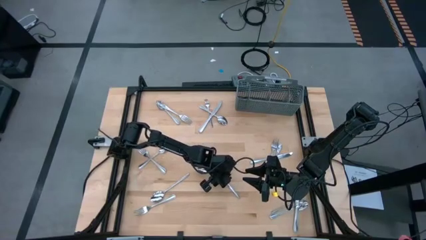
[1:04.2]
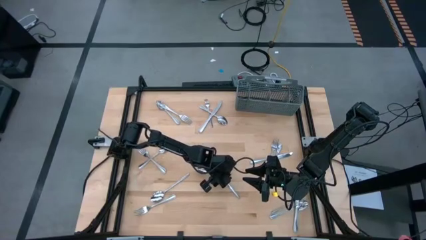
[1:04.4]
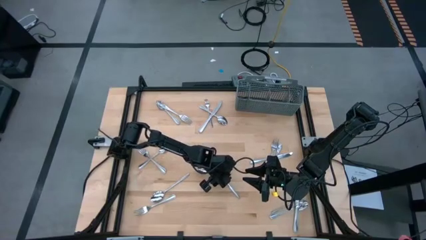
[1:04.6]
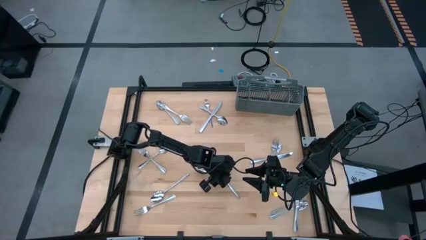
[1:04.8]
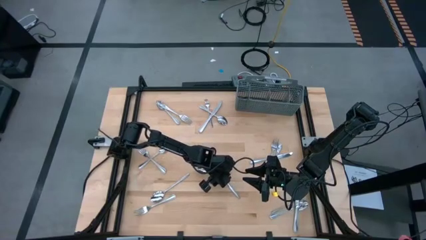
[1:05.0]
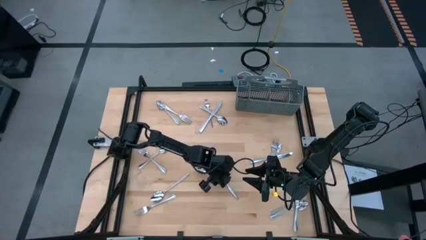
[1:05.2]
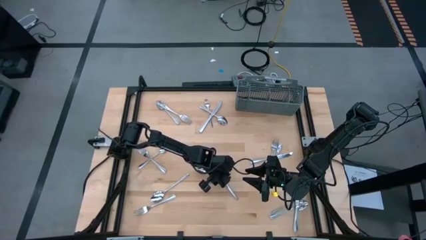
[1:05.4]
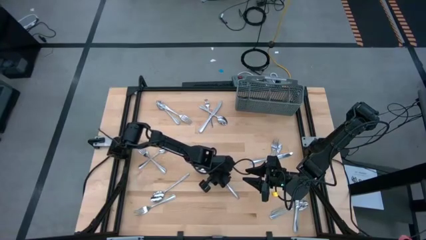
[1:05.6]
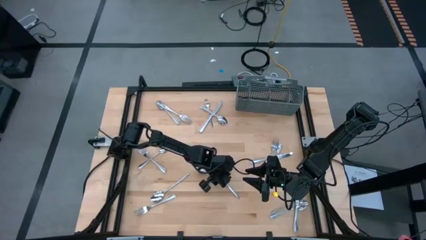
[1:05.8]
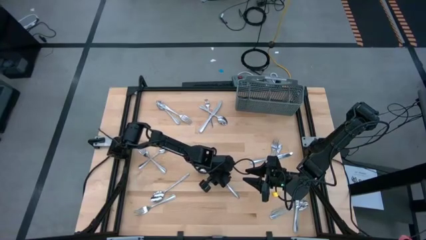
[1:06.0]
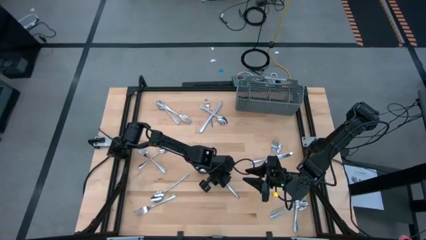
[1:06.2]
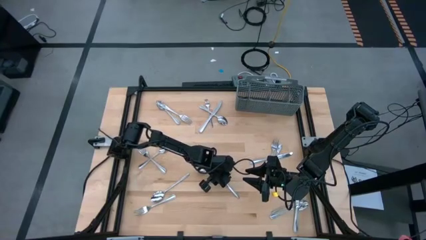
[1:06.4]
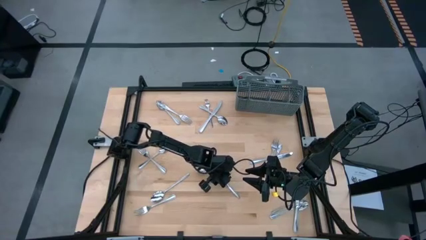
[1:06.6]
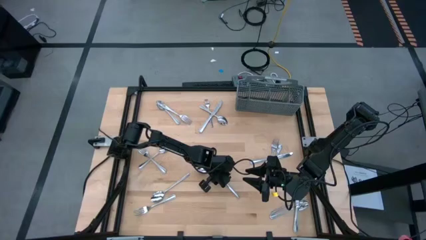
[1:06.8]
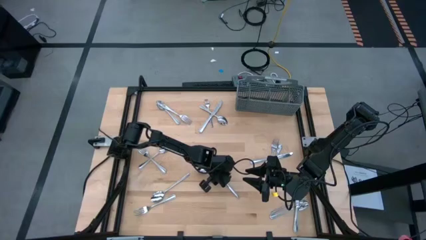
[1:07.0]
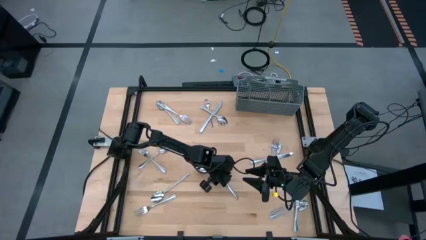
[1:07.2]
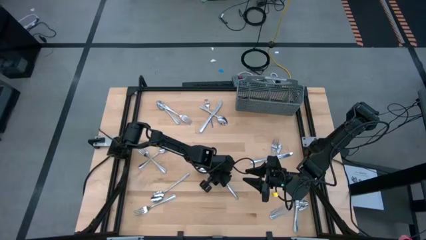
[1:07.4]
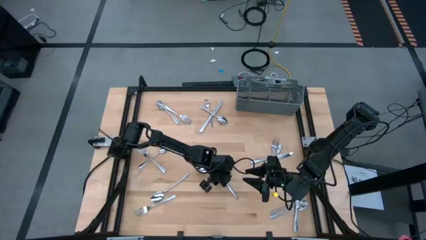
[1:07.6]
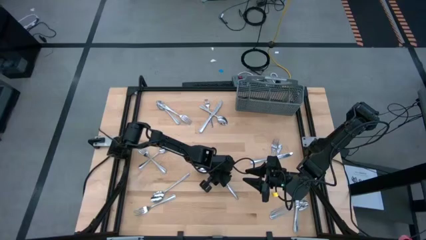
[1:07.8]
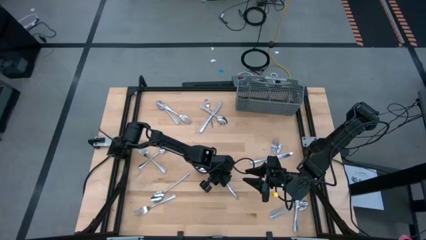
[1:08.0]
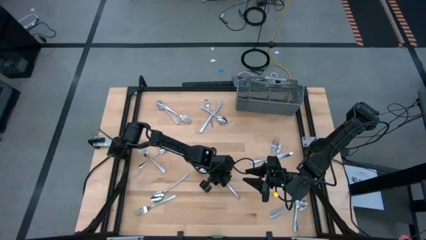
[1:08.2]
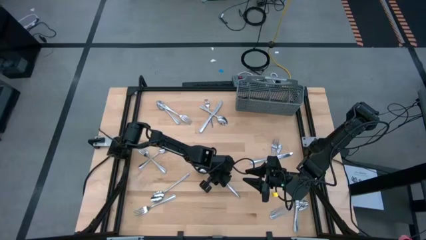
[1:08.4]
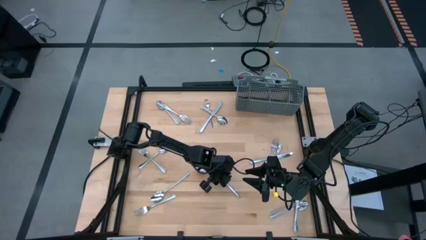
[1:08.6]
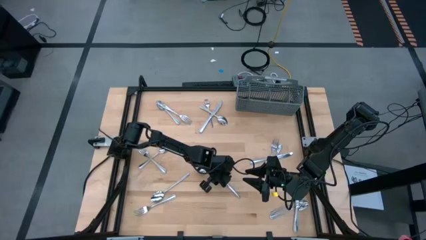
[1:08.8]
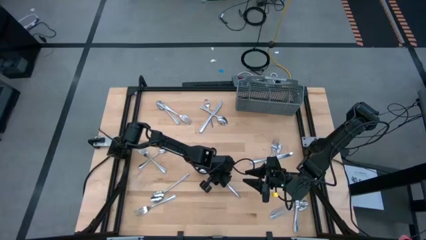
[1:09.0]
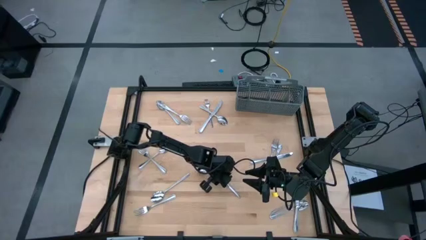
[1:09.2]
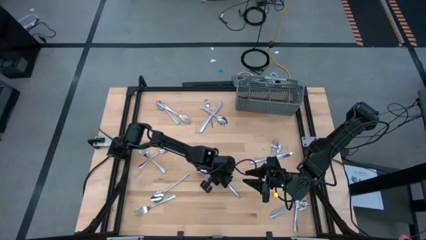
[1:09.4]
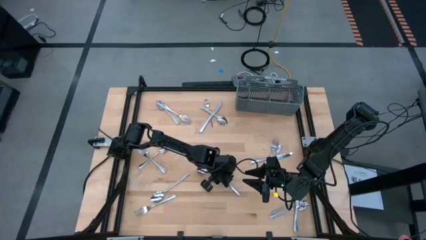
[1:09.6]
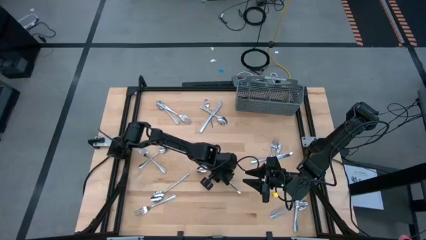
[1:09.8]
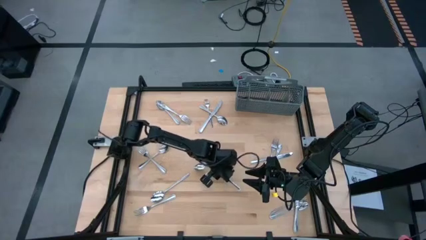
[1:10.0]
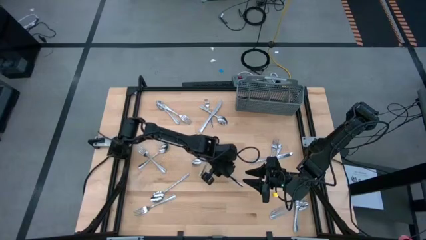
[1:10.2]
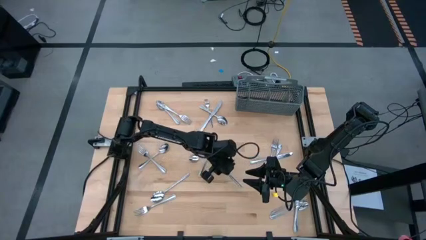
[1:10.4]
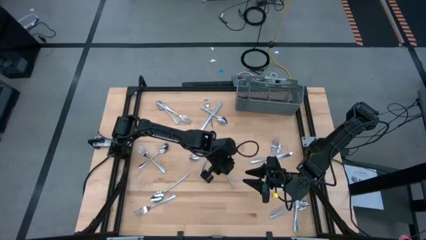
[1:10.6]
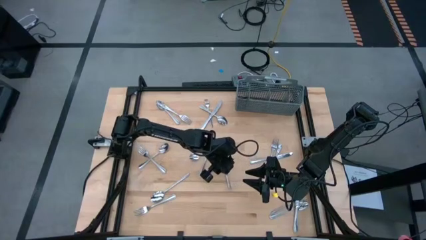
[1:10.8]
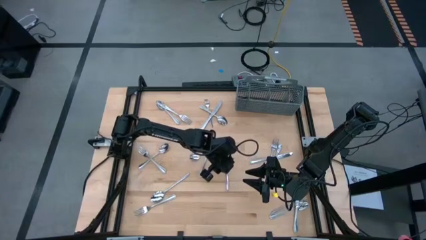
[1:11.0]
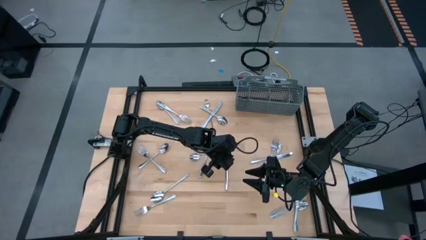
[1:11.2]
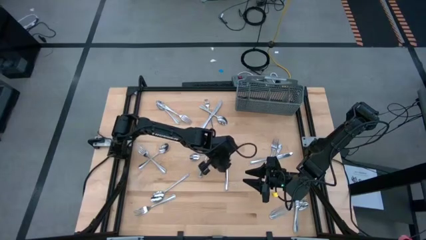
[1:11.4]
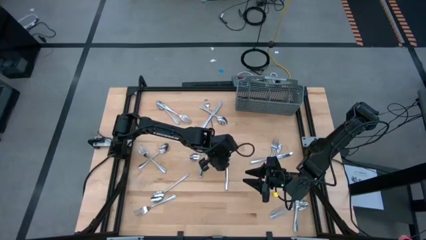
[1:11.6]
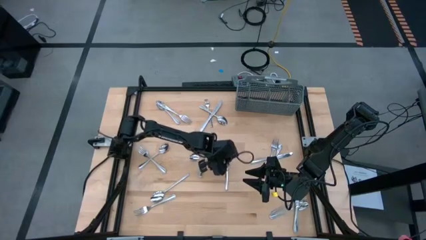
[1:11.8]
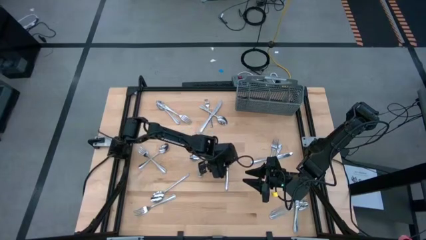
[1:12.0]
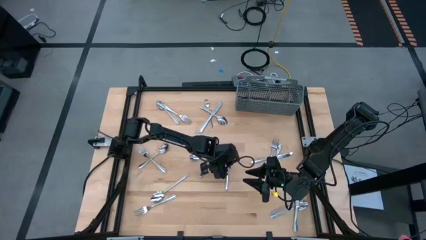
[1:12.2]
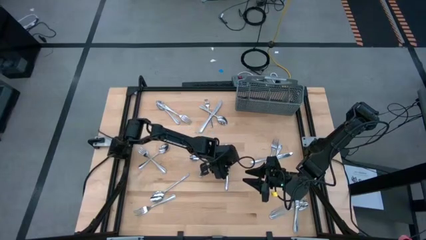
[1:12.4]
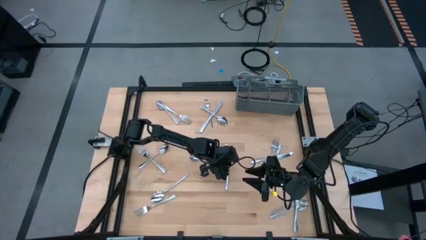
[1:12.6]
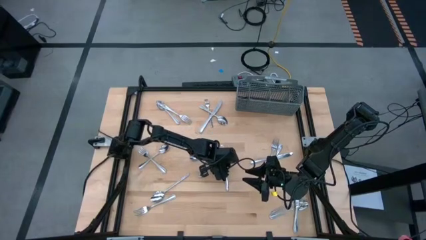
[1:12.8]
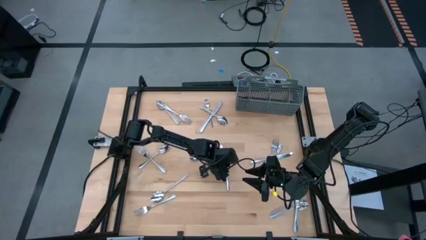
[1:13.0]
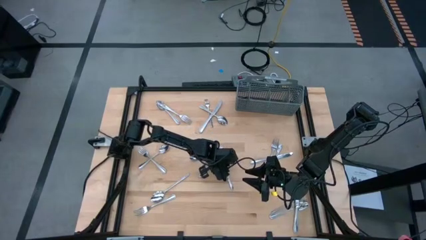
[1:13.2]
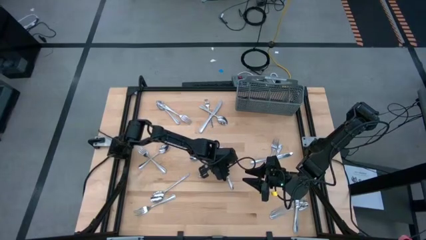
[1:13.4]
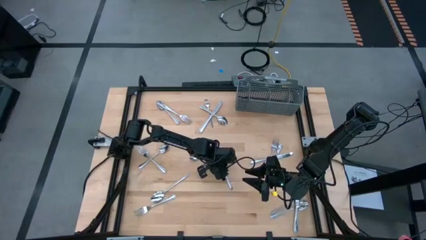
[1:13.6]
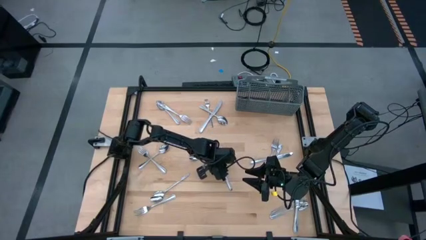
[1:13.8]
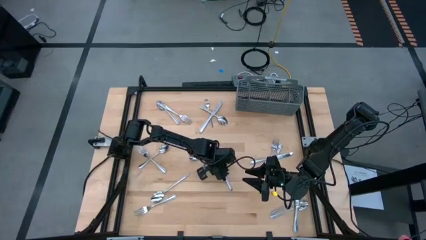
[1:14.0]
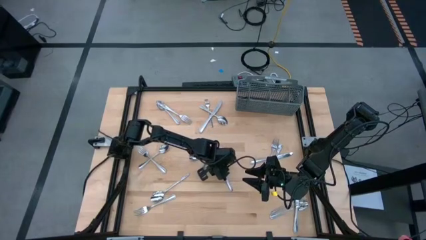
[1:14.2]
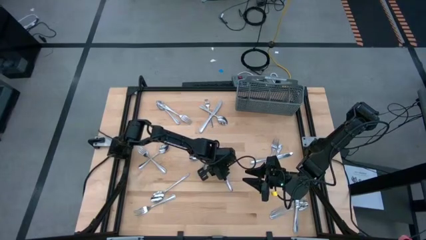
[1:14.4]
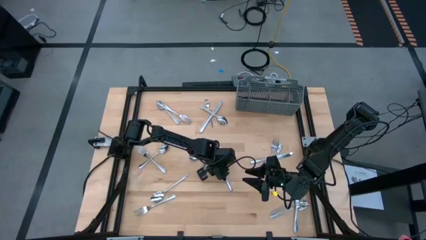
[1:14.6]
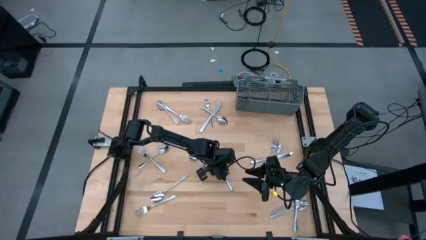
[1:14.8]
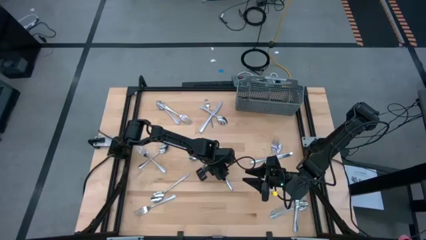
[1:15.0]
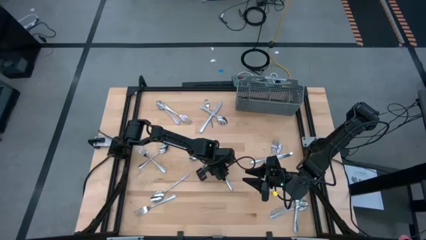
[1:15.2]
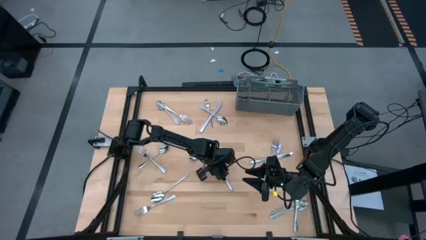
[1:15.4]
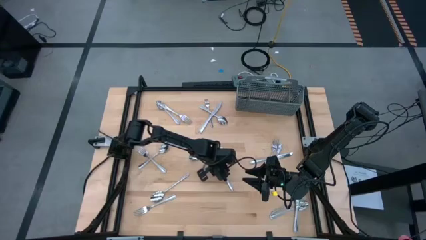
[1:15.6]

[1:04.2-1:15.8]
Task: Sort silverware
Put the silver knife into the silverware basket

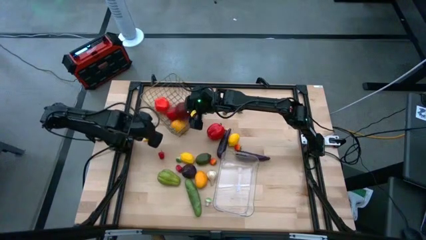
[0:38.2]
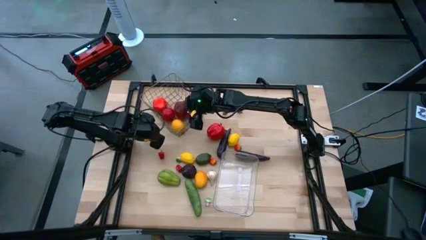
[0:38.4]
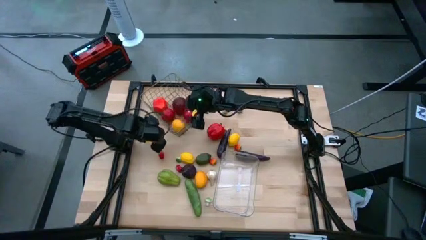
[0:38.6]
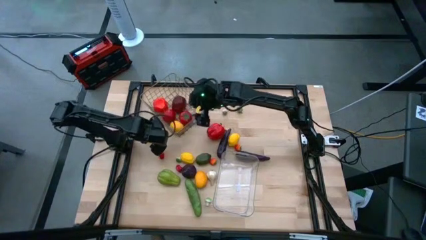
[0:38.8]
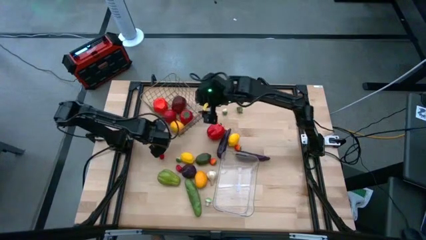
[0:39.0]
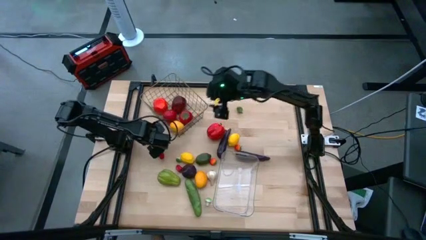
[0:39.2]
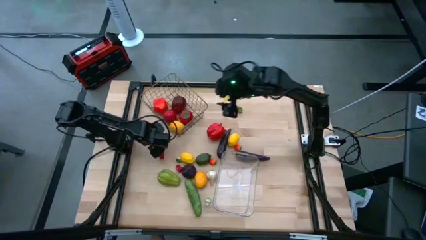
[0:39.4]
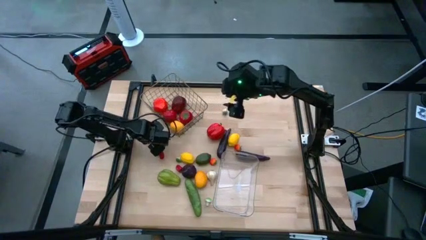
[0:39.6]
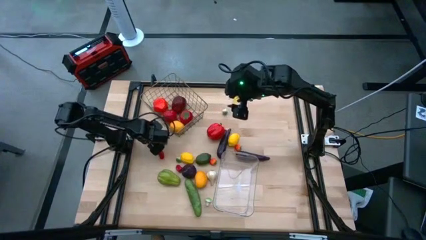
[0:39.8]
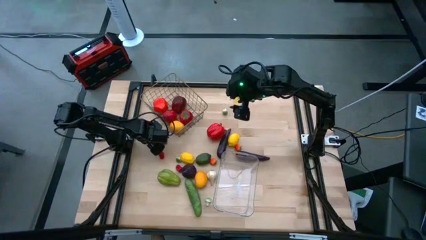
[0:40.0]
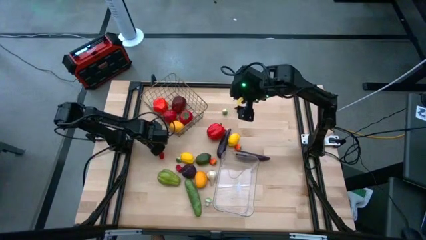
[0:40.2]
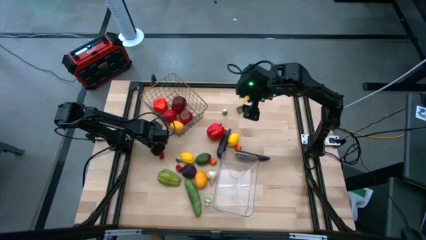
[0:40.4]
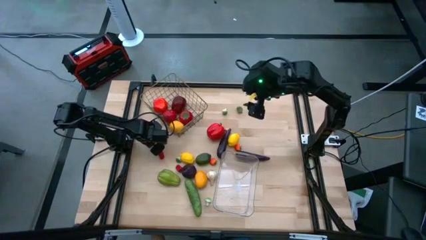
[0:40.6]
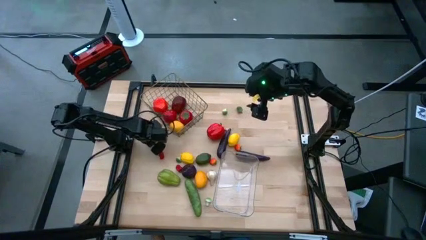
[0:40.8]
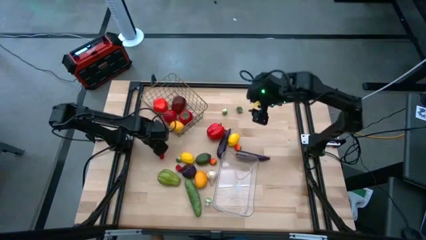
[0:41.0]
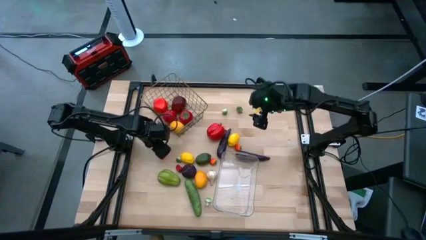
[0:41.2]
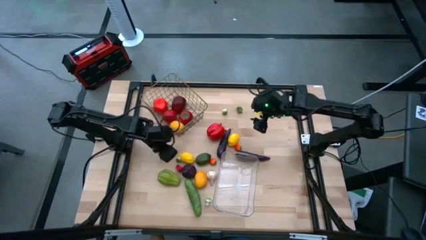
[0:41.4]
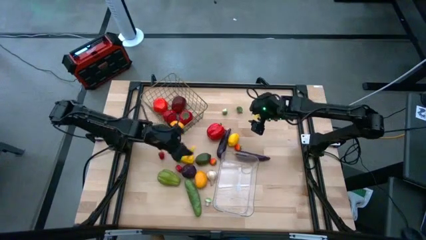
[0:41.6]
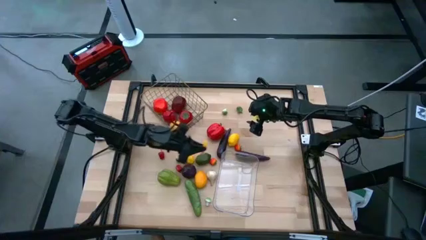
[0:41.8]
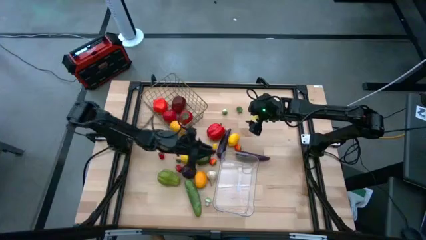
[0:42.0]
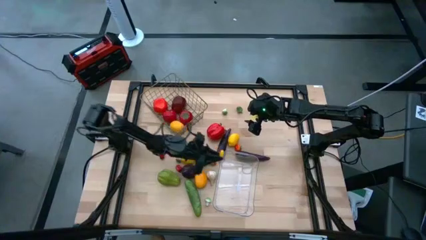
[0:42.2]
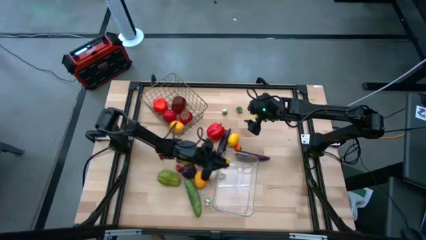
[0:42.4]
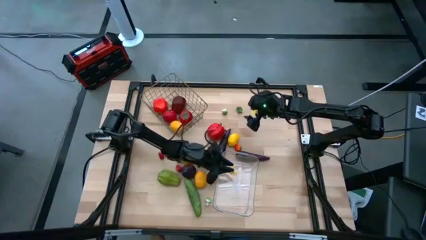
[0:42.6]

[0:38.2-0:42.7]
Task: Sort produce into baskets
Put the yellow corn into the transparent bin
